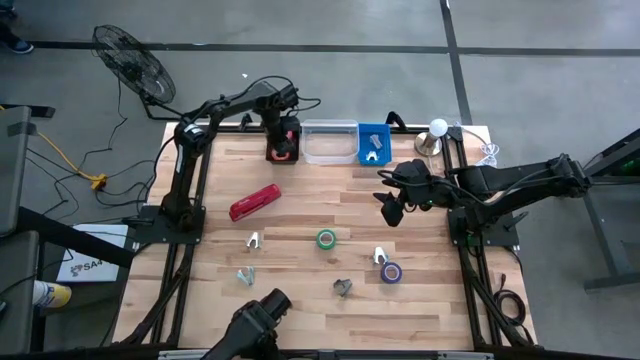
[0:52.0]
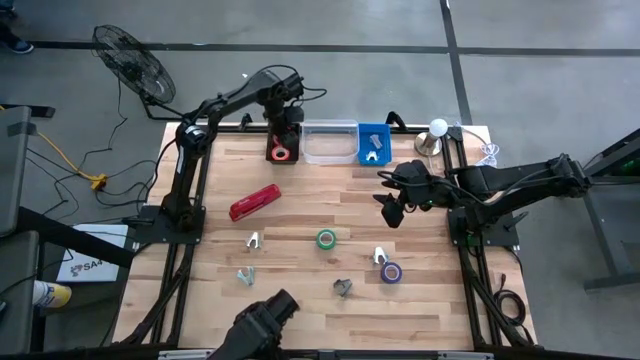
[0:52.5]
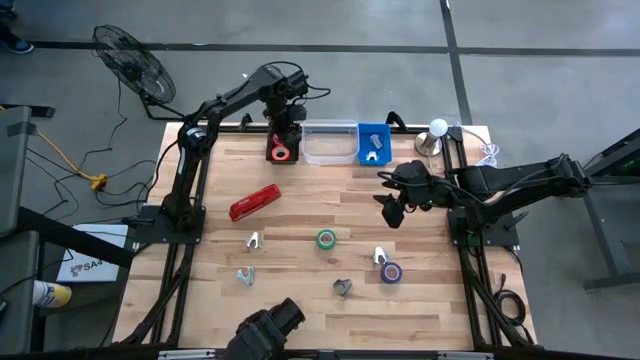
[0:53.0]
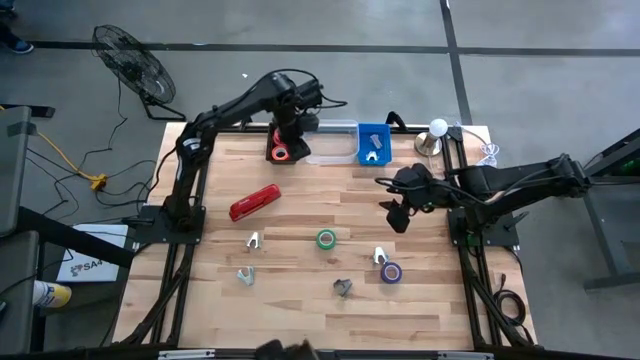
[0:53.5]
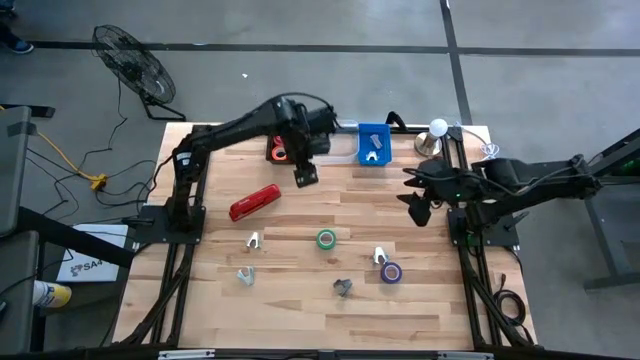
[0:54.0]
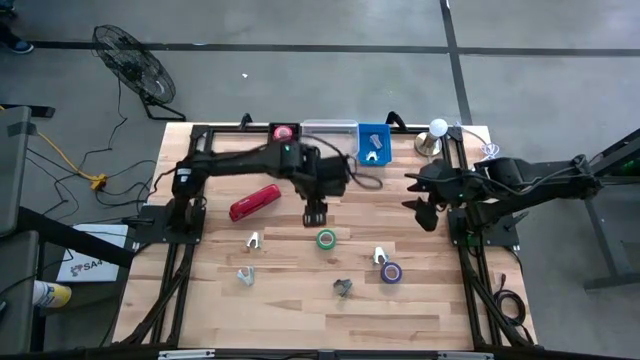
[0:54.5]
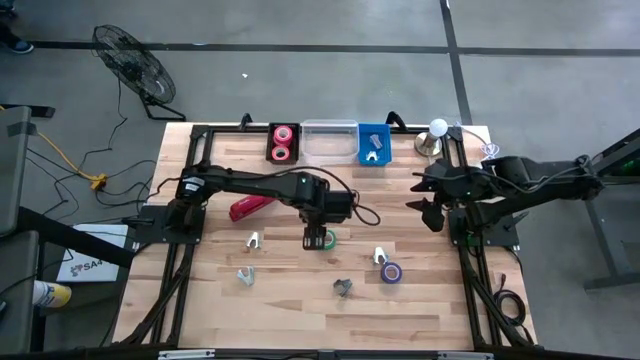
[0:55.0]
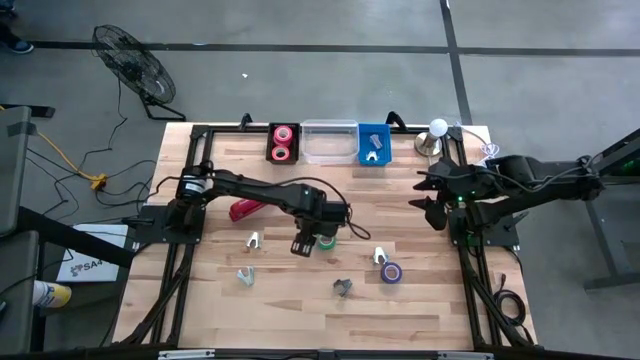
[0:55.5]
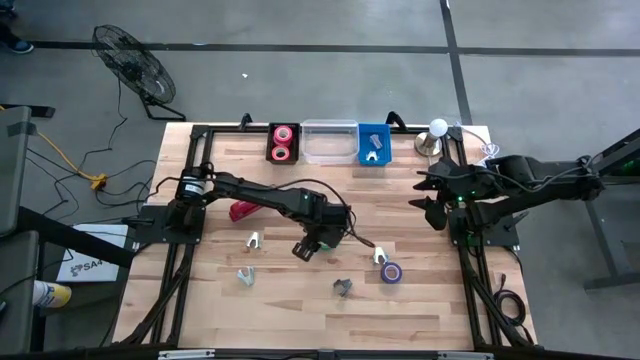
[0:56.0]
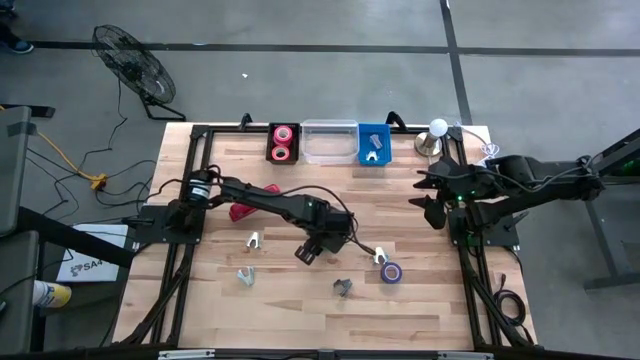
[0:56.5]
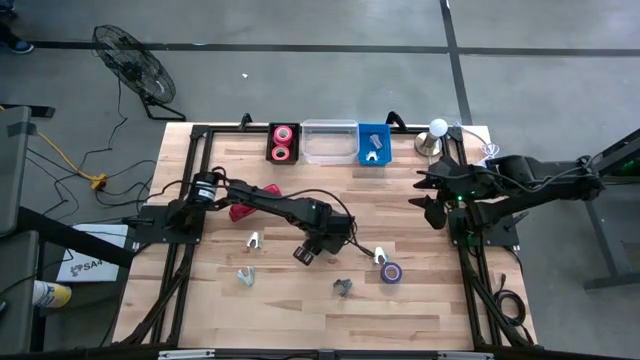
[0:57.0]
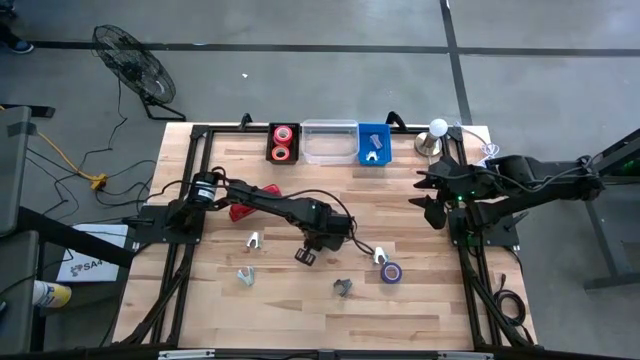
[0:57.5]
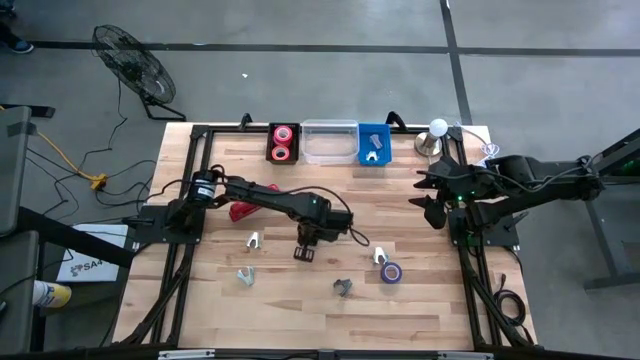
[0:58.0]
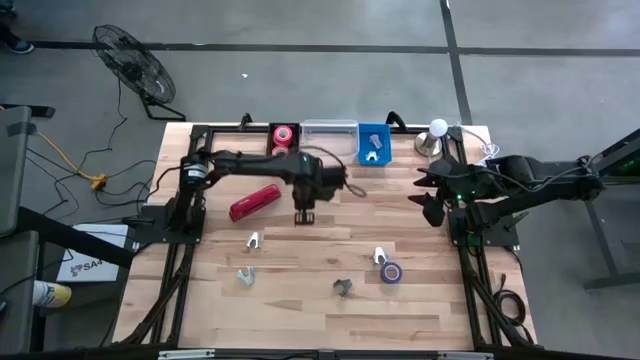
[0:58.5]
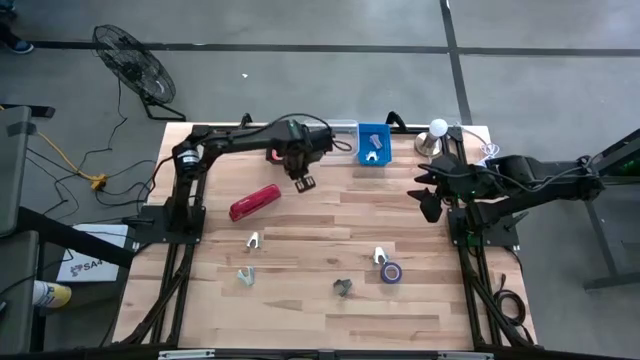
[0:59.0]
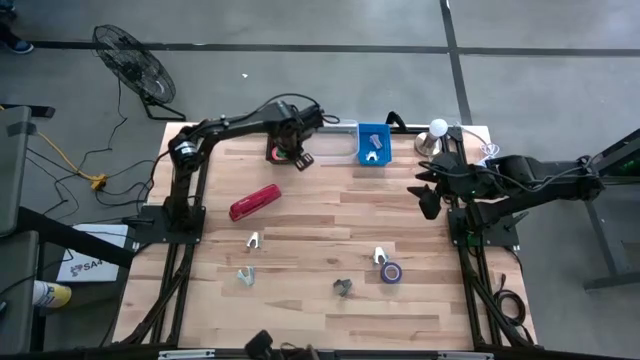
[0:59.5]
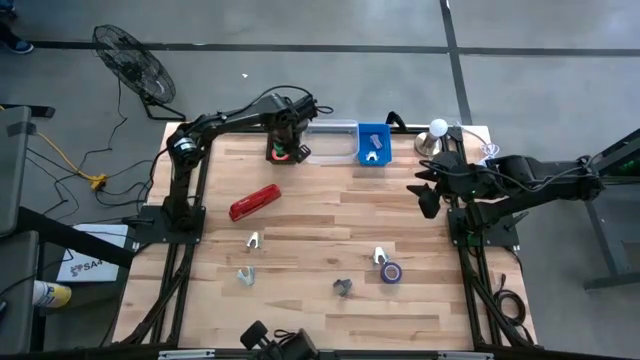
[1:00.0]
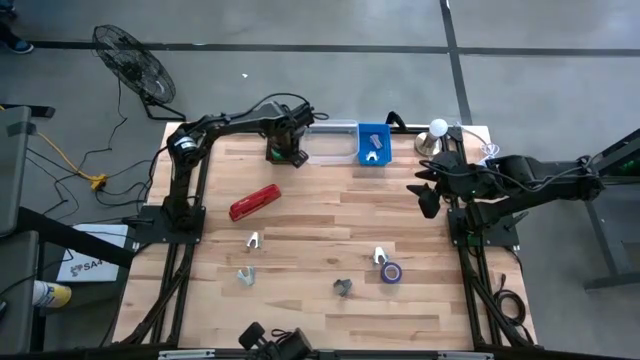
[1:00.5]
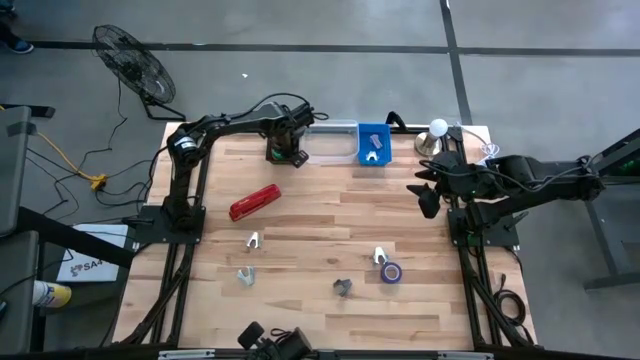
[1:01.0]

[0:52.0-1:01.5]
Task: Pick and place Stapler, Stapler remover, tape
Put the green tape into the black bin

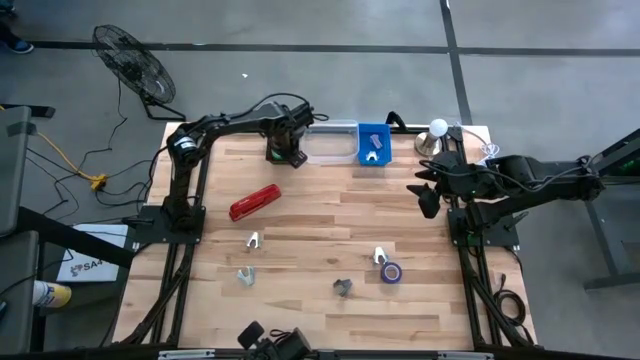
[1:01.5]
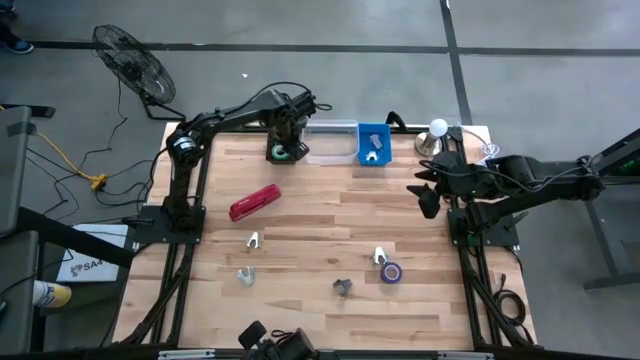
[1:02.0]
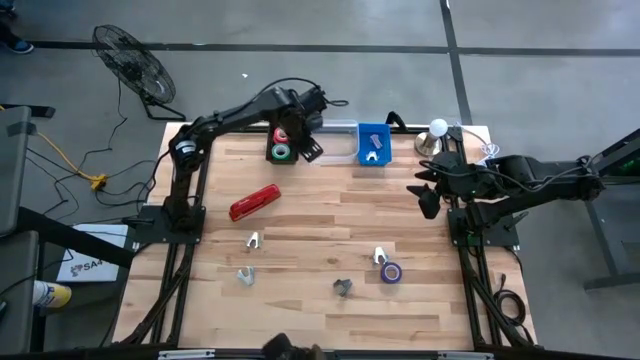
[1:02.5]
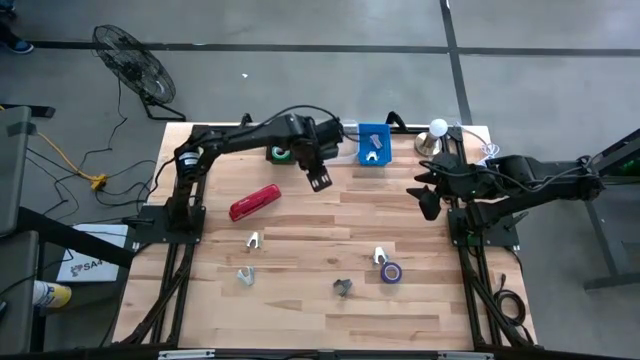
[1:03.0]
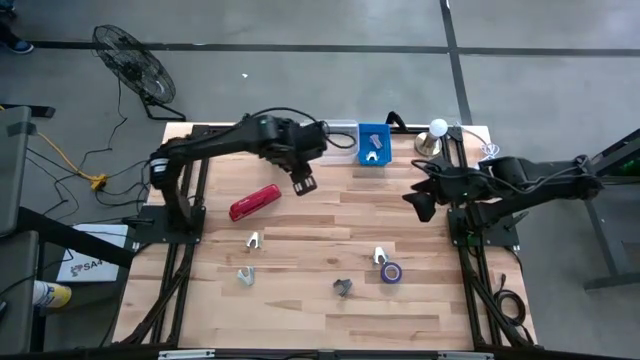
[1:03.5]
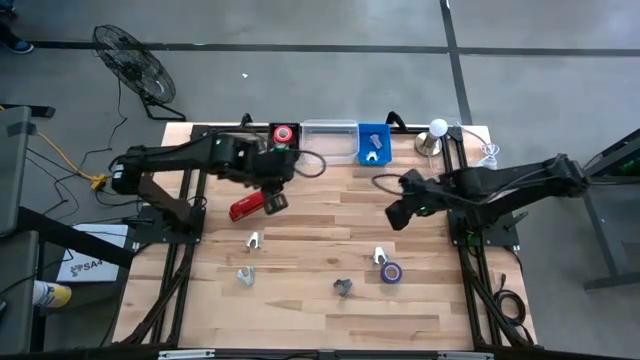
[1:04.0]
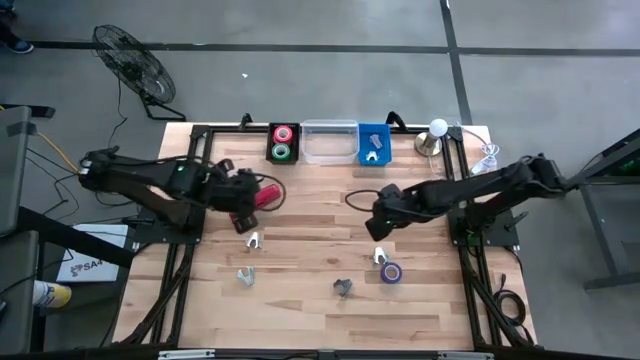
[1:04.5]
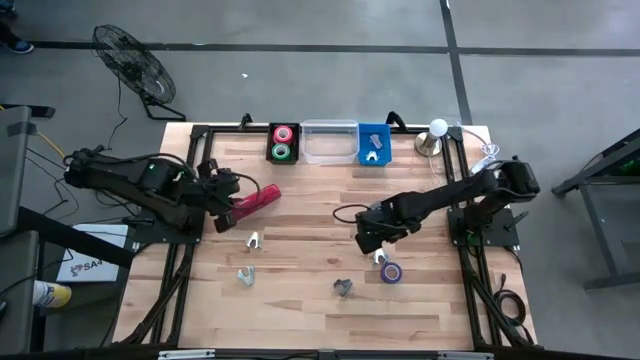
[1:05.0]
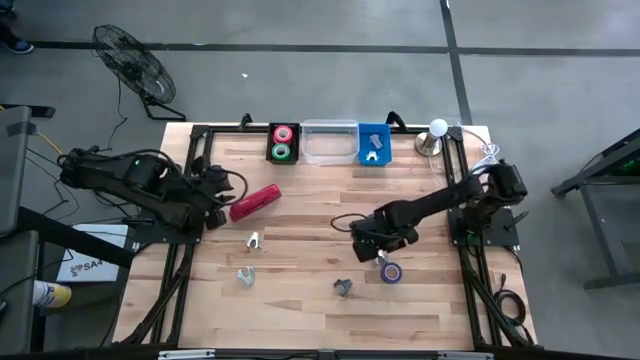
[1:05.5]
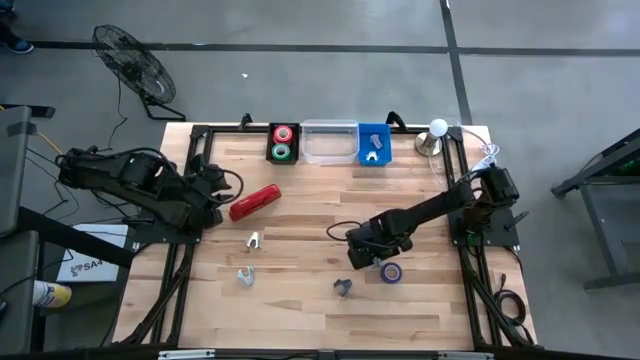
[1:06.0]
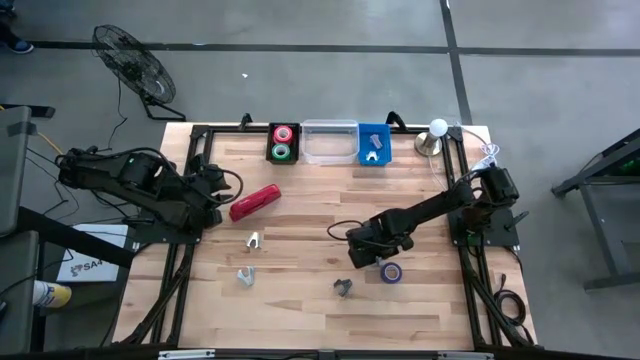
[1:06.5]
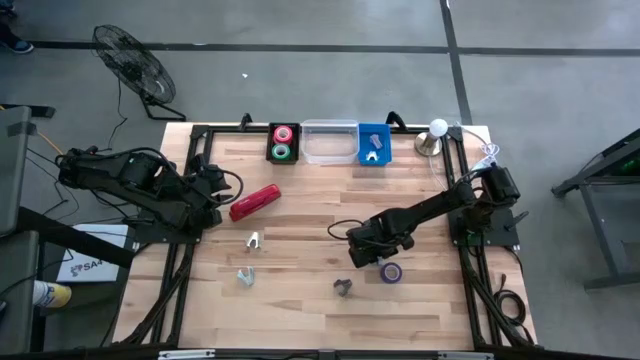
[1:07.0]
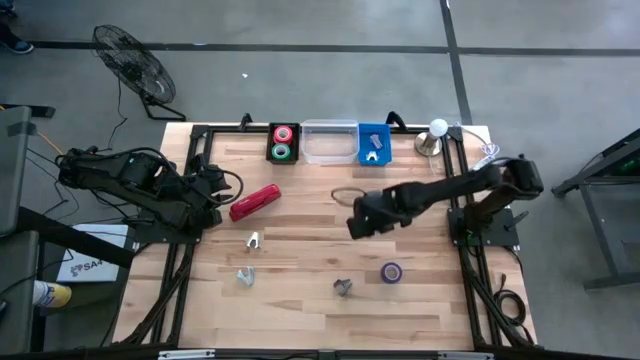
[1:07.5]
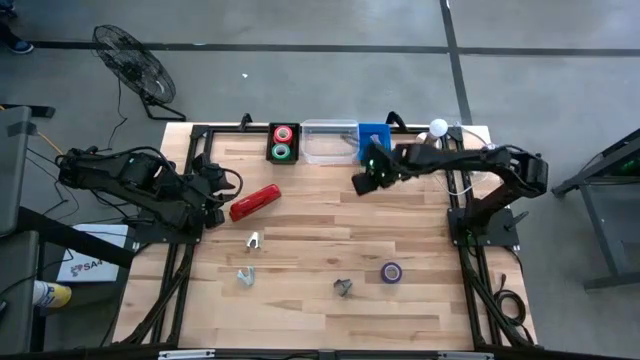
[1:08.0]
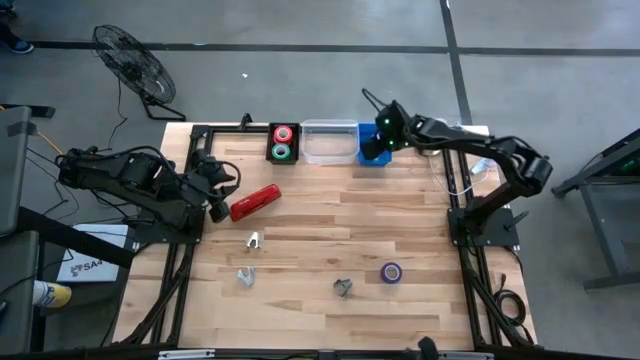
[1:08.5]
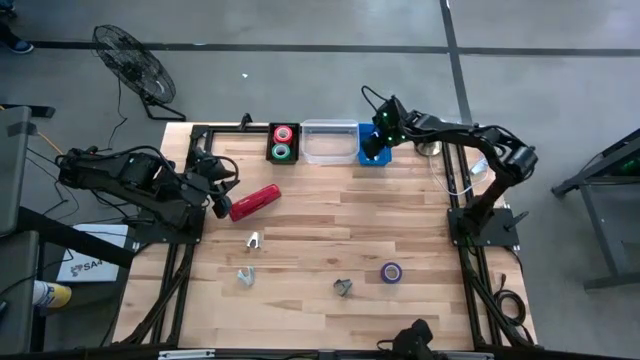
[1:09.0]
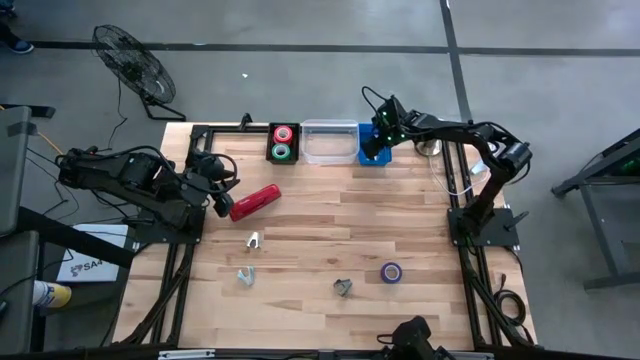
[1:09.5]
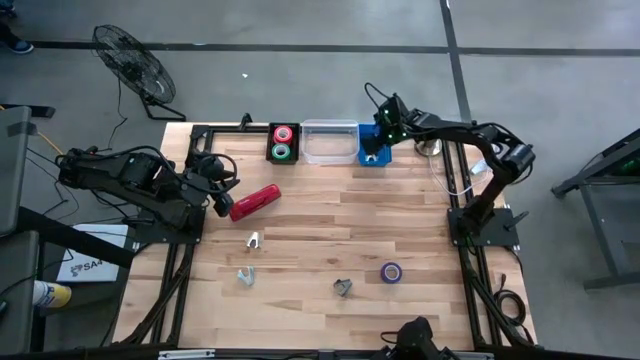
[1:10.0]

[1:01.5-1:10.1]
Put the top blue staple remover into the blue bin

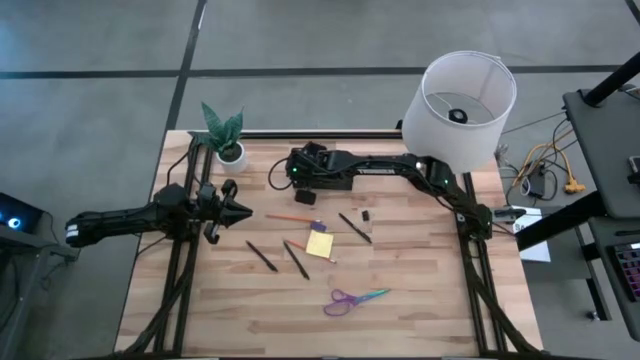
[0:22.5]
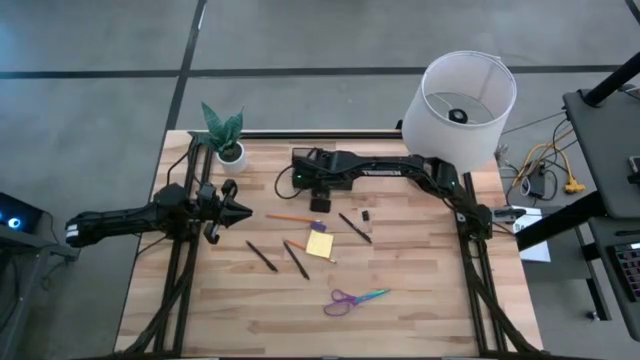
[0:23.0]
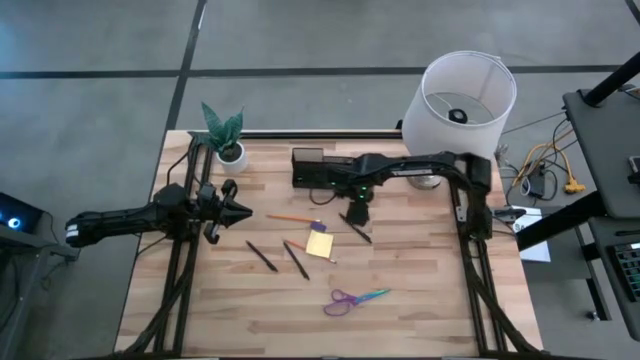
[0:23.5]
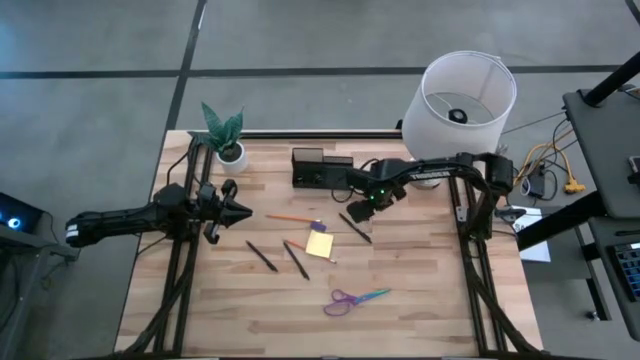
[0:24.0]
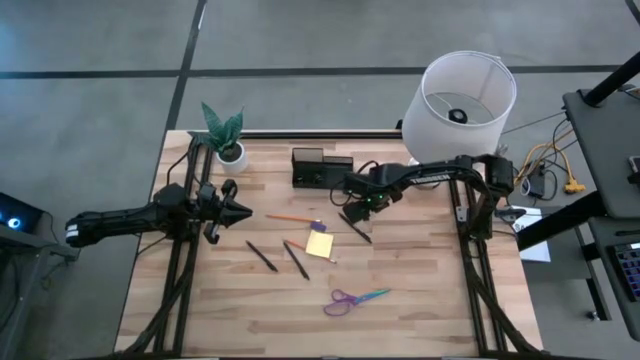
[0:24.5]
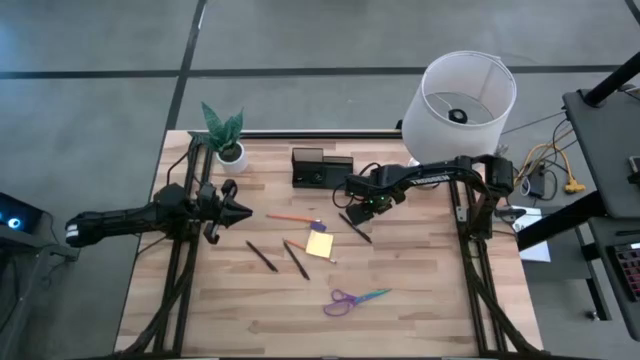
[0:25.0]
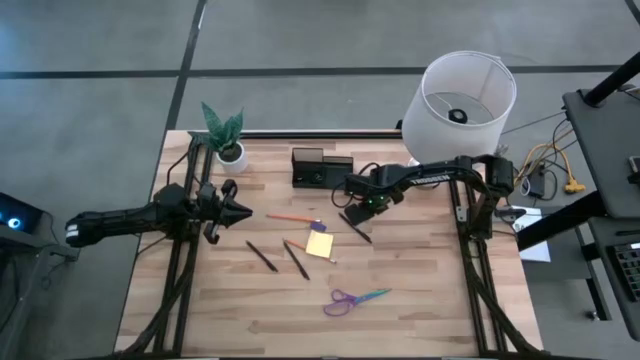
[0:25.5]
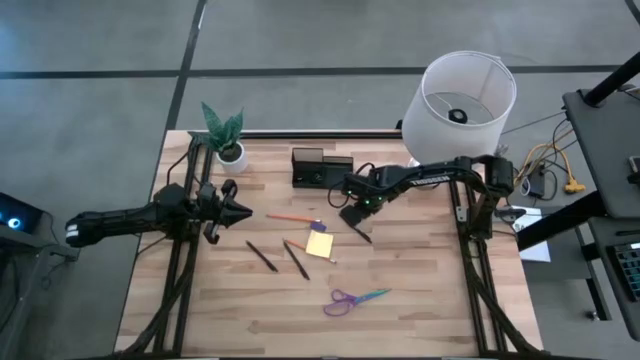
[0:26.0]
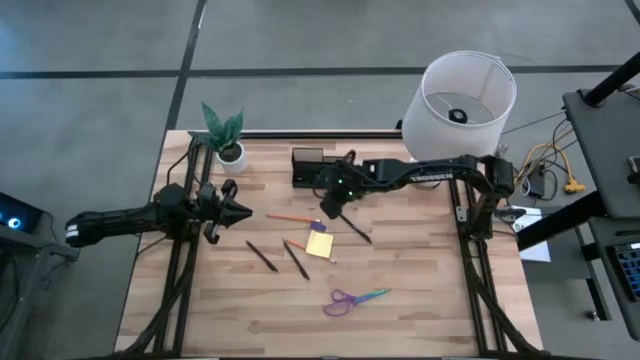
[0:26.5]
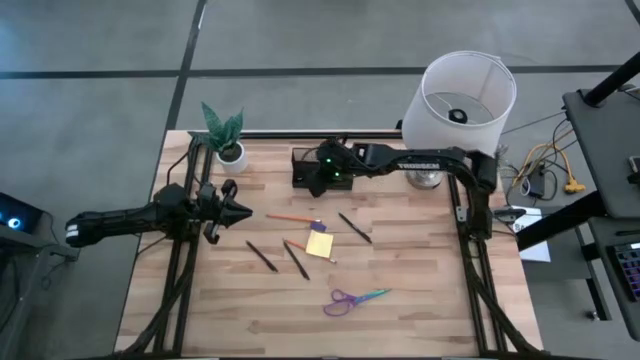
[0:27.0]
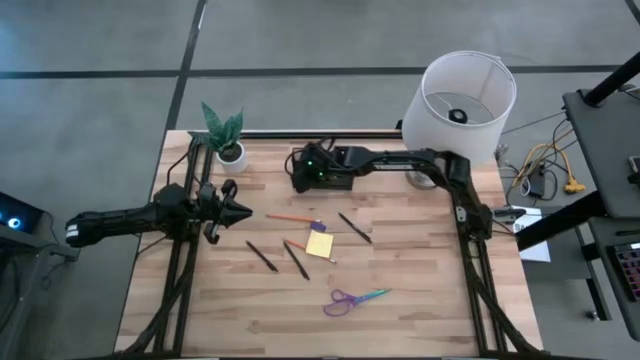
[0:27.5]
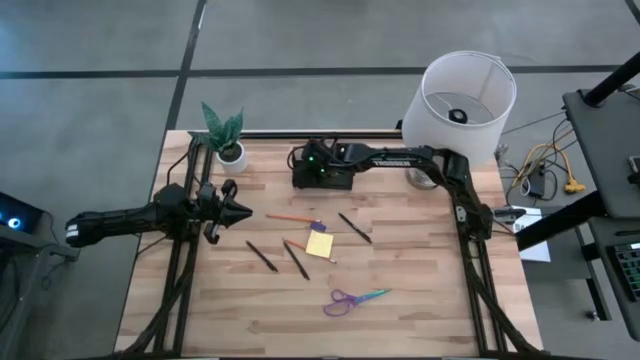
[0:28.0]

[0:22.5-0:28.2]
Task: Pick and place office supplies into organizer
Put the black binder clip into the black desk organizer
